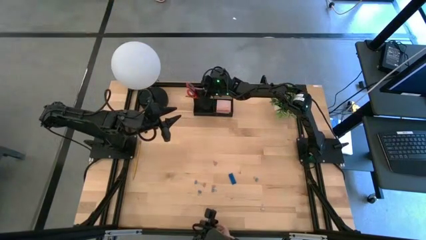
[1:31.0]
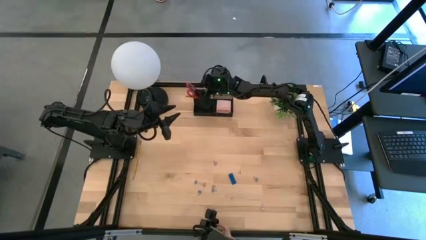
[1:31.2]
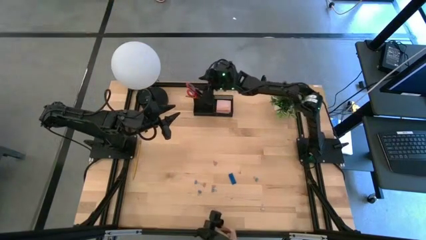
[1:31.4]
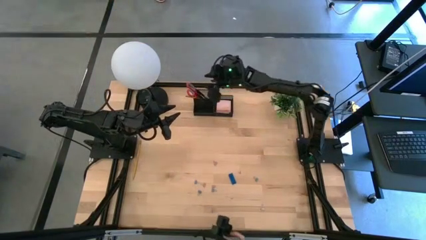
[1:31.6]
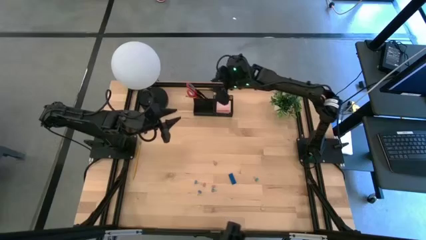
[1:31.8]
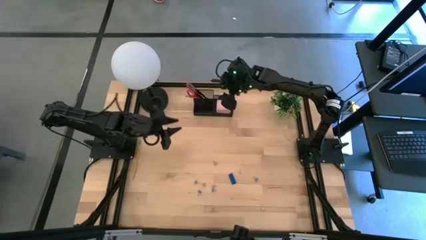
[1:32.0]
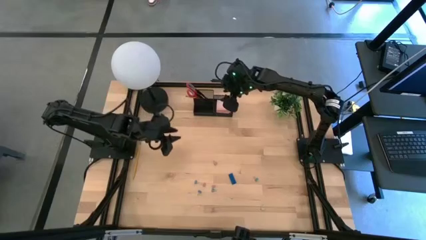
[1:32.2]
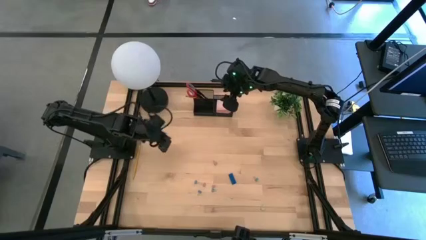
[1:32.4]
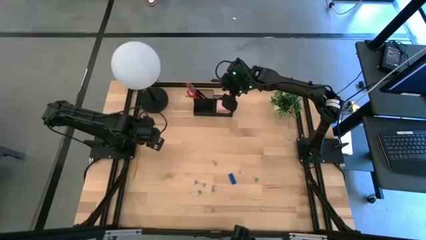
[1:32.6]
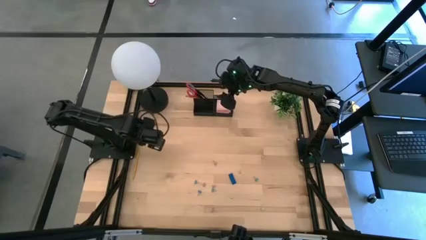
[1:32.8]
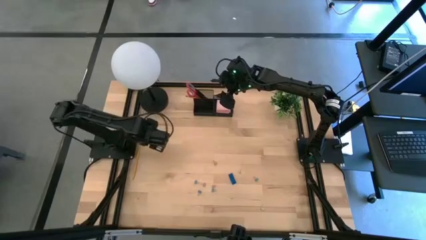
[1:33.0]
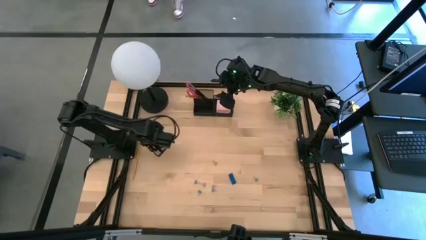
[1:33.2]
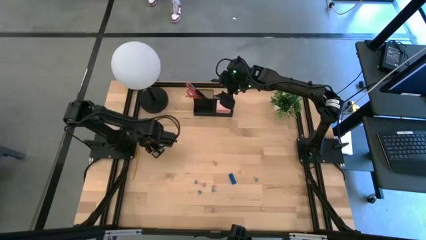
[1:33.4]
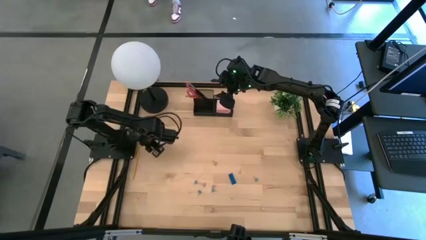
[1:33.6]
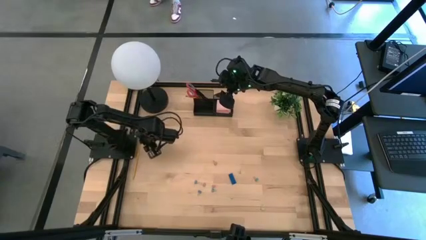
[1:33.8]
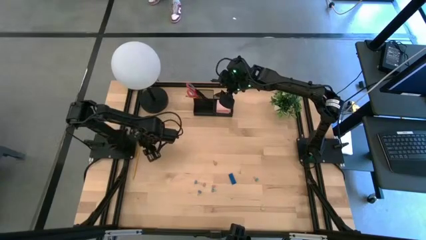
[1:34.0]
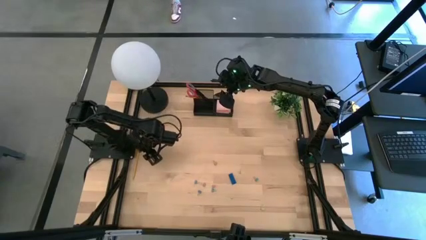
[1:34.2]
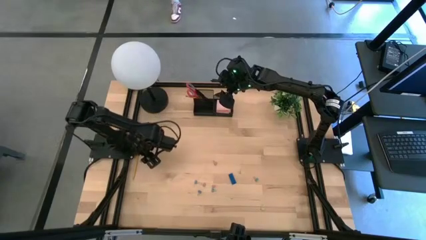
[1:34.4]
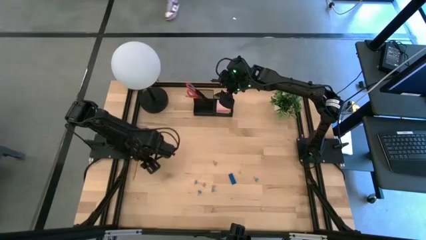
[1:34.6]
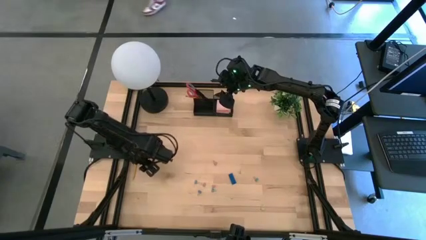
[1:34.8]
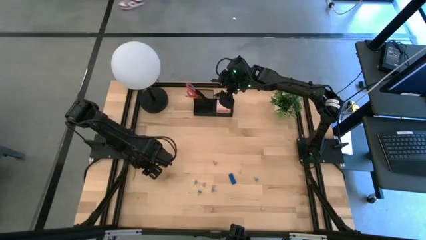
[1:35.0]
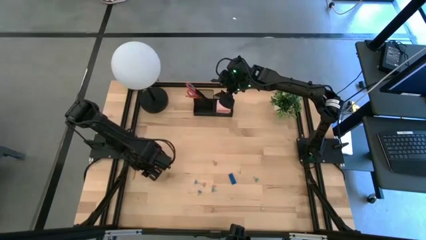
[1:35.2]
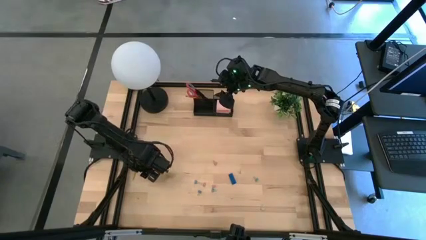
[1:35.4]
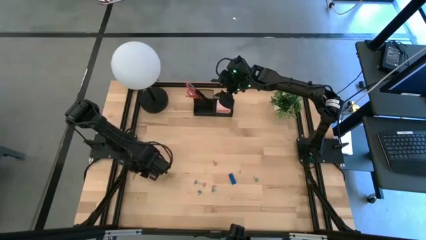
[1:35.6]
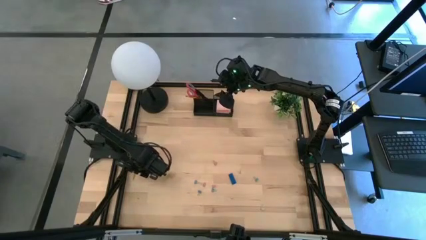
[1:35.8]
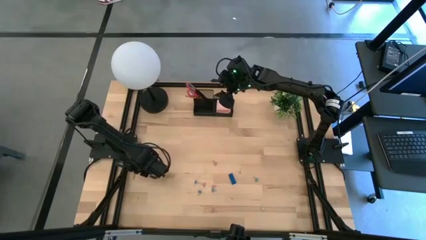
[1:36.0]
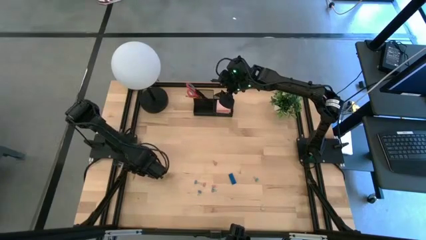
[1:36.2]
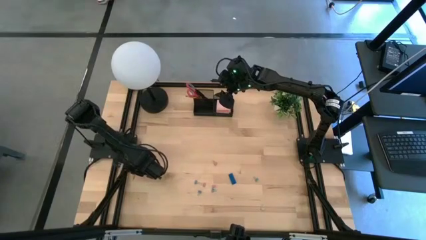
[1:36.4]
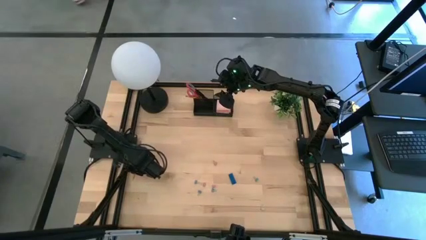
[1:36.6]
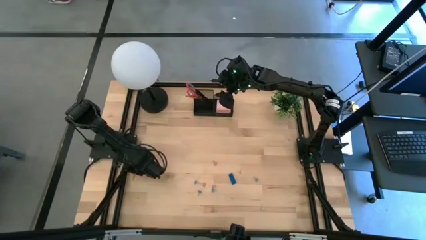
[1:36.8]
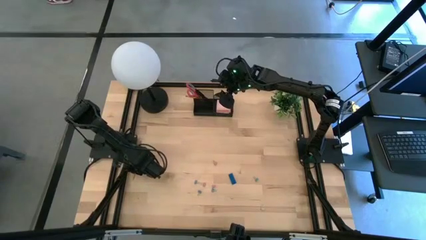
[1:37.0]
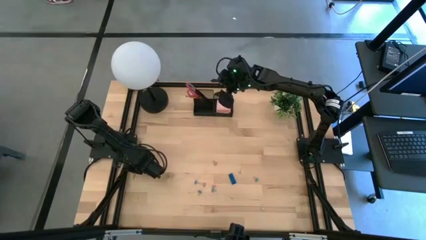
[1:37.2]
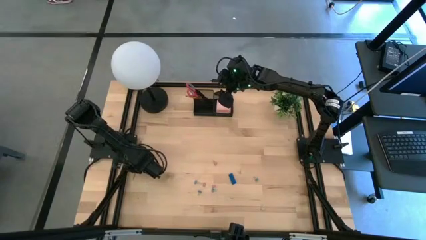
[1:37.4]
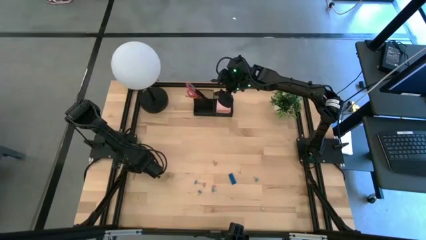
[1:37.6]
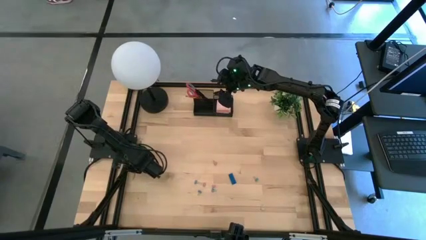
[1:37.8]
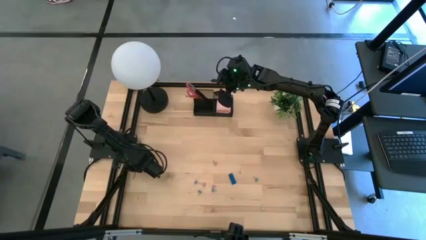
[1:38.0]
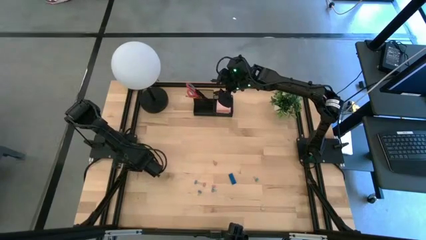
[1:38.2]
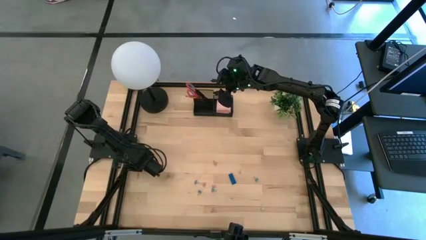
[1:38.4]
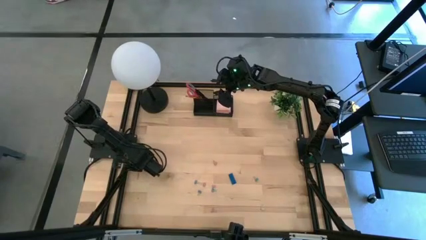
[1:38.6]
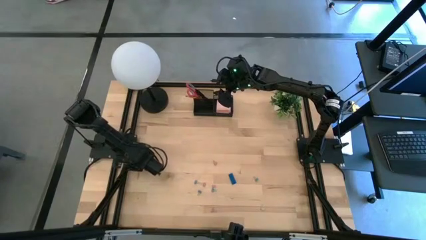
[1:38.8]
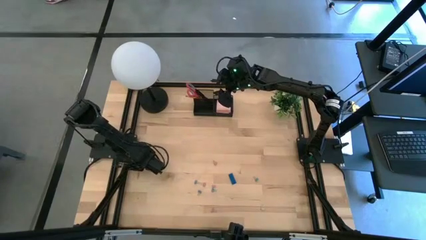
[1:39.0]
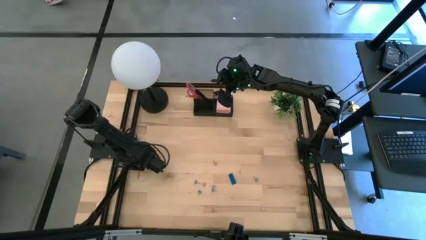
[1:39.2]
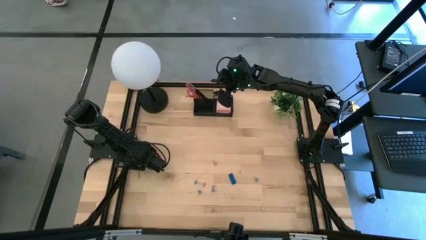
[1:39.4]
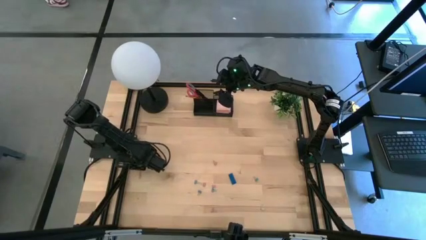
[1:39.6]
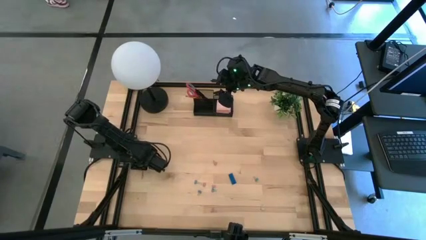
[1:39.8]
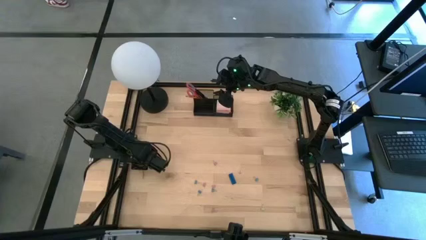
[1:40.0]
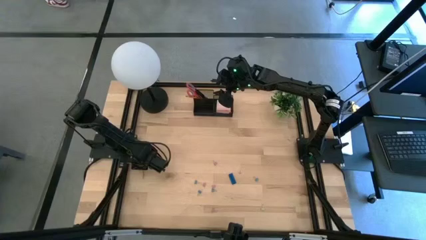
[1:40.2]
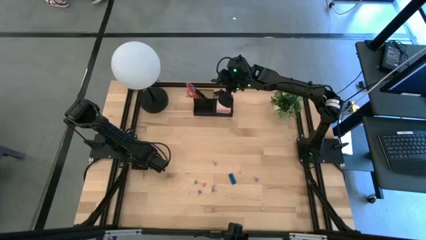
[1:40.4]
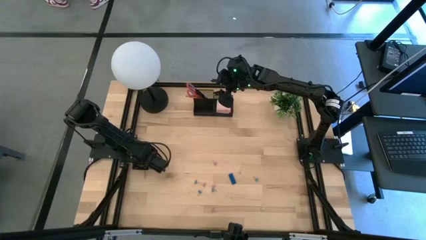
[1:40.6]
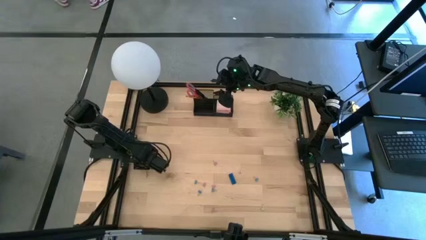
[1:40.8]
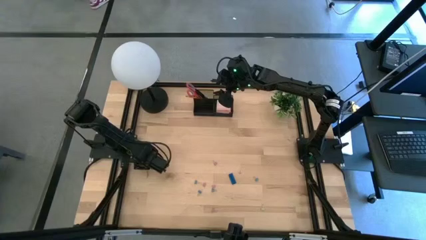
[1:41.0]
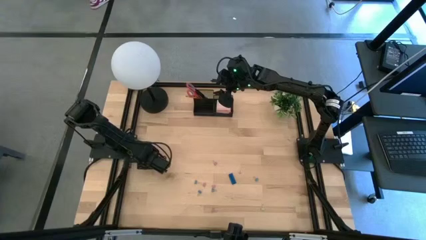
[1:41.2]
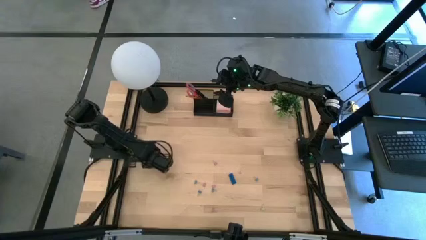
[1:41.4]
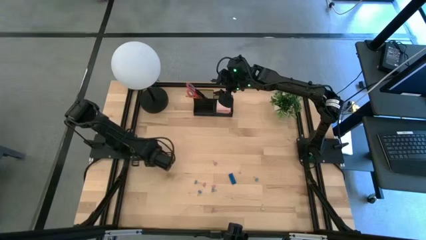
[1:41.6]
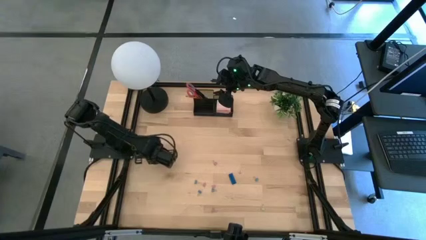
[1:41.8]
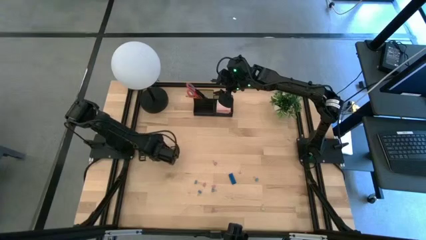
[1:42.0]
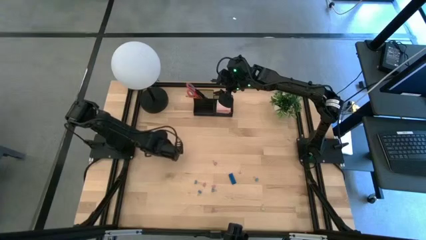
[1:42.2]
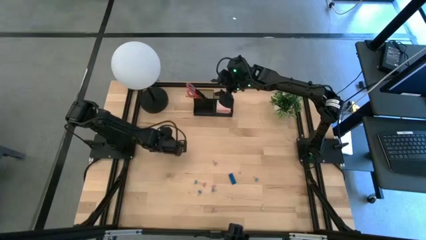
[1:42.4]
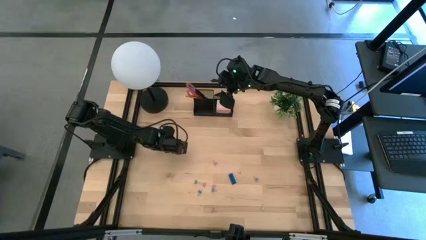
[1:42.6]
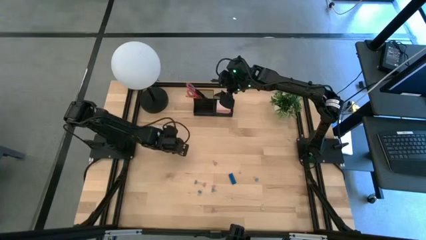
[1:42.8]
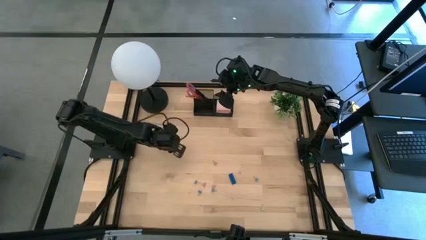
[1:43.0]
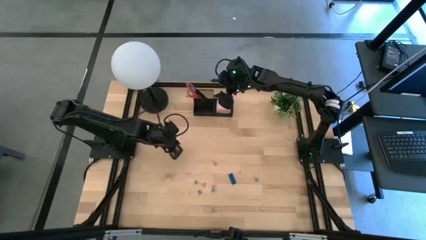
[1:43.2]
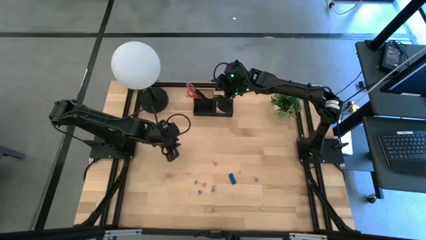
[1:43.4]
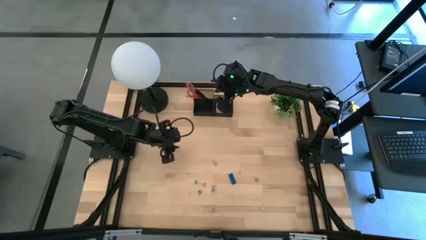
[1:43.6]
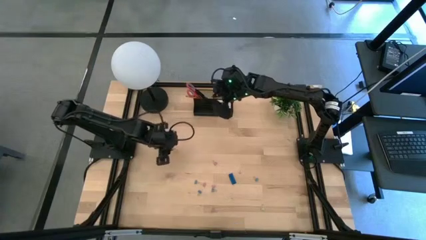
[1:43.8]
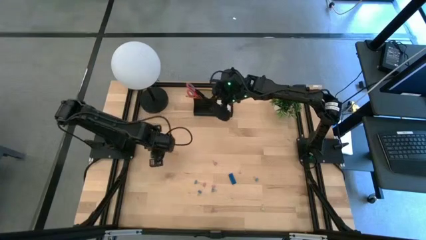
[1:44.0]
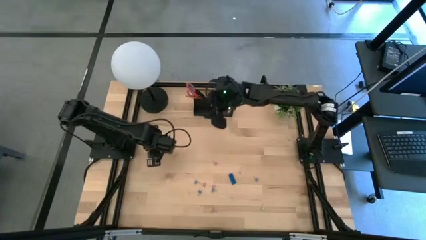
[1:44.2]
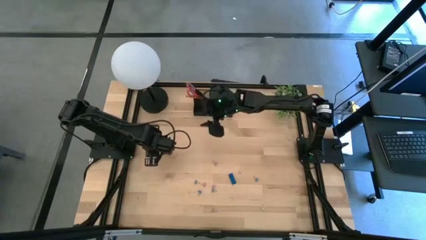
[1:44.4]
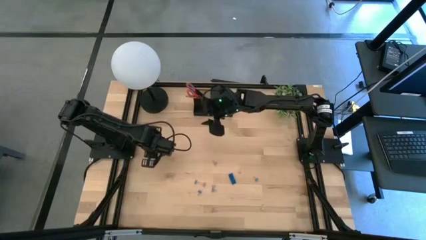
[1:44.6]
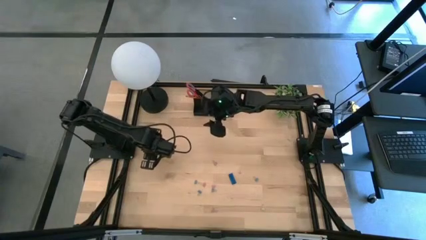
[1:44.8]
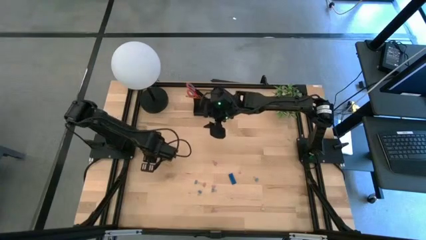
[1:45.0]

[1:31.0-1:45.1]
Task: Pick and place office supplies into organizer
Put the yellow pencil into the black desk organizer
